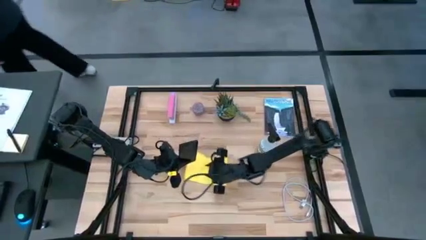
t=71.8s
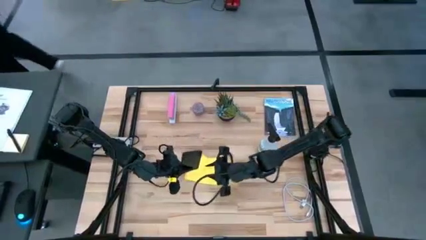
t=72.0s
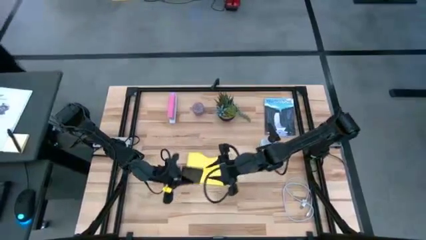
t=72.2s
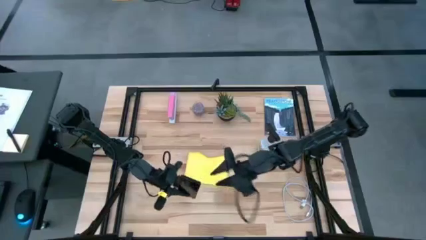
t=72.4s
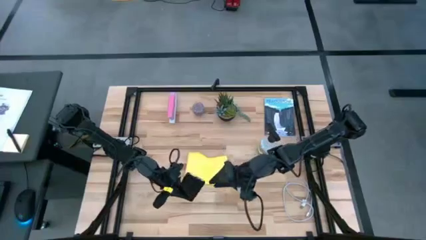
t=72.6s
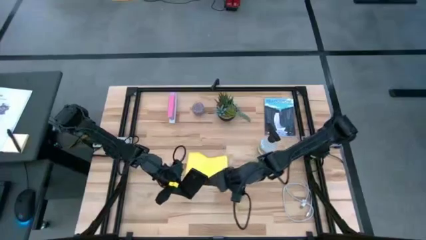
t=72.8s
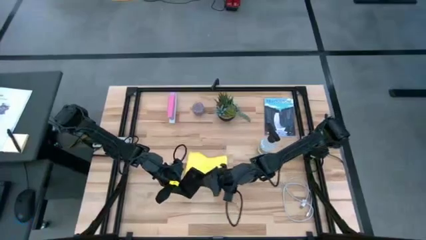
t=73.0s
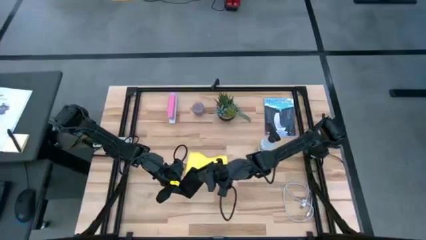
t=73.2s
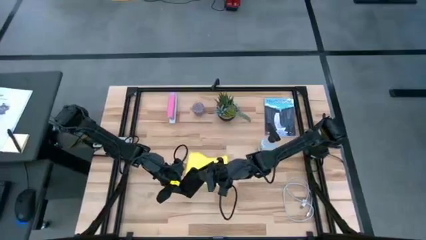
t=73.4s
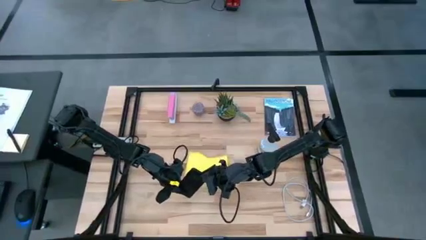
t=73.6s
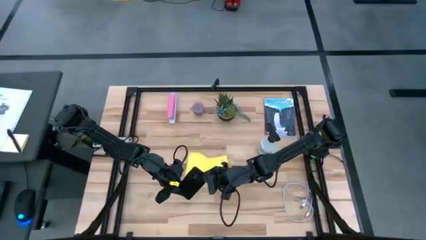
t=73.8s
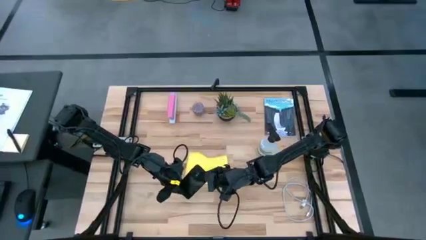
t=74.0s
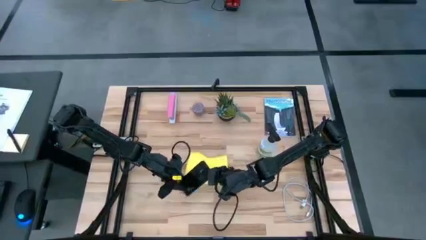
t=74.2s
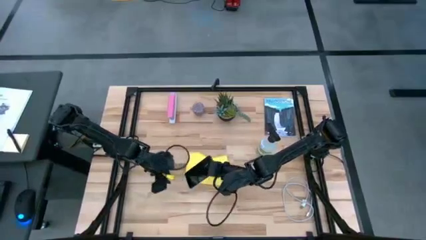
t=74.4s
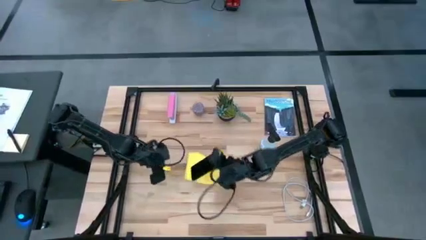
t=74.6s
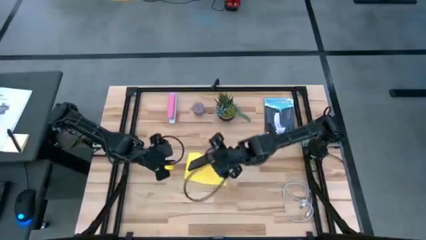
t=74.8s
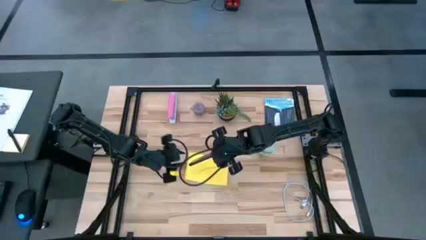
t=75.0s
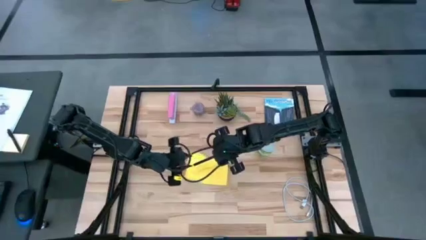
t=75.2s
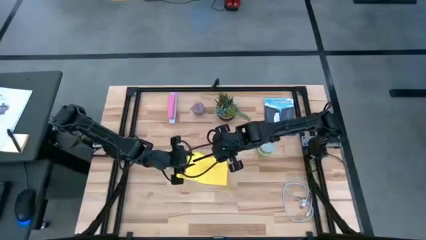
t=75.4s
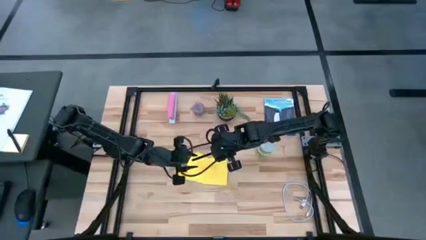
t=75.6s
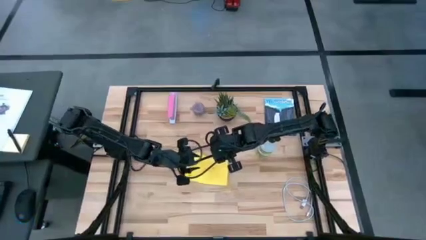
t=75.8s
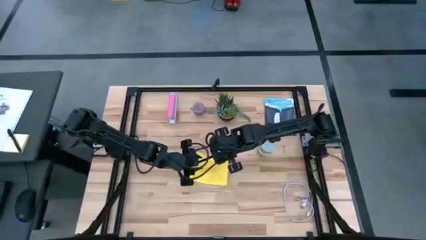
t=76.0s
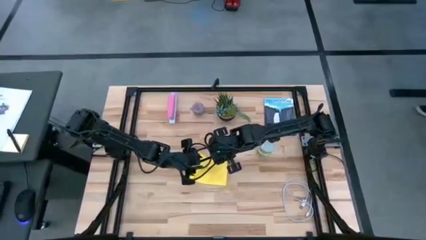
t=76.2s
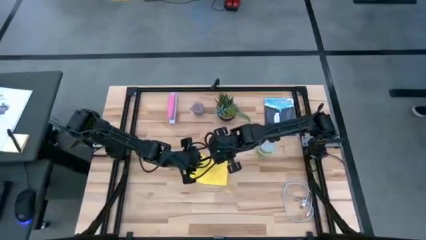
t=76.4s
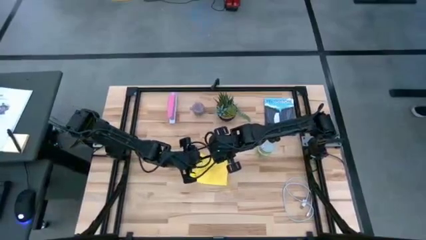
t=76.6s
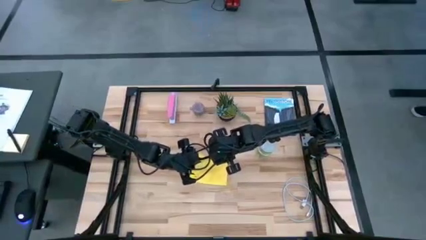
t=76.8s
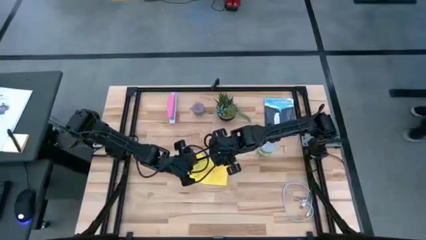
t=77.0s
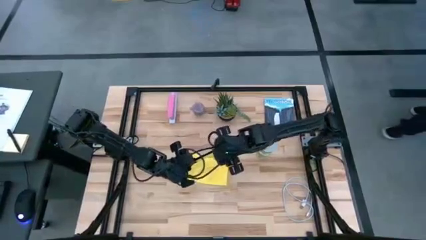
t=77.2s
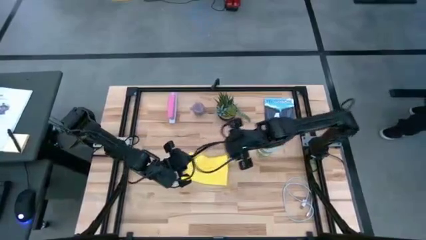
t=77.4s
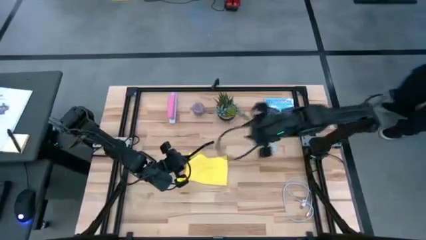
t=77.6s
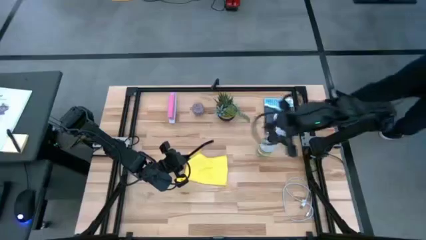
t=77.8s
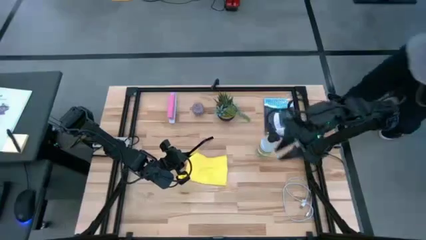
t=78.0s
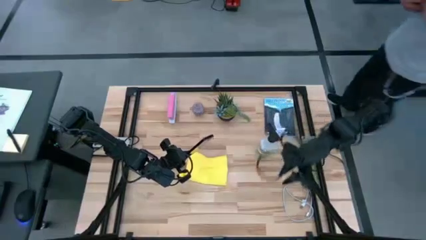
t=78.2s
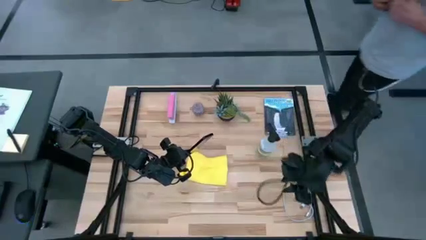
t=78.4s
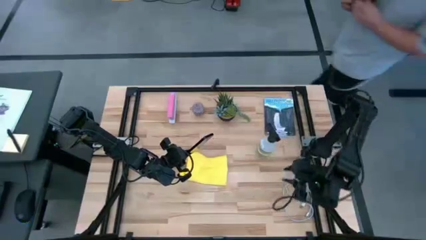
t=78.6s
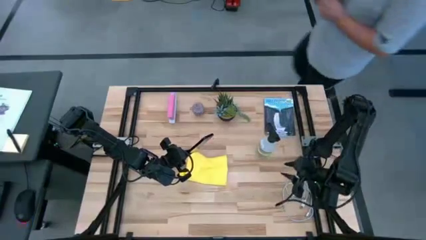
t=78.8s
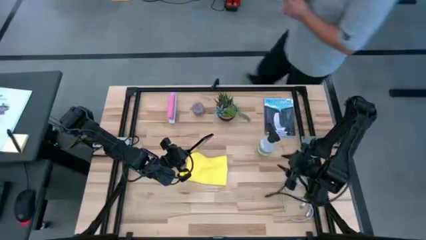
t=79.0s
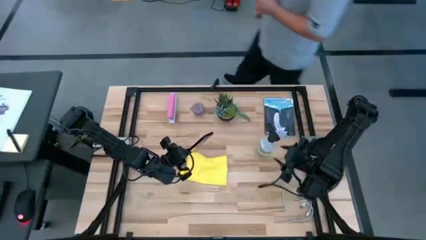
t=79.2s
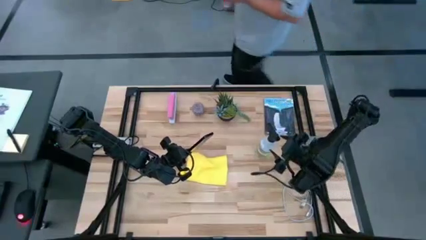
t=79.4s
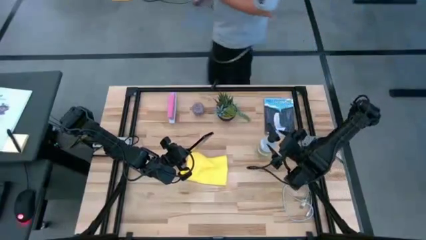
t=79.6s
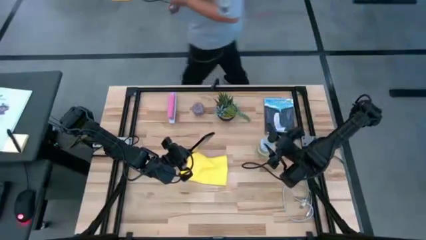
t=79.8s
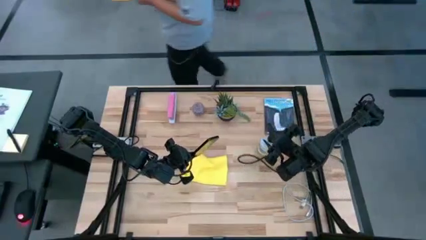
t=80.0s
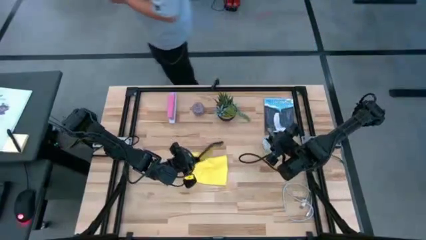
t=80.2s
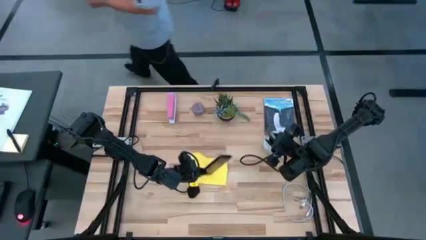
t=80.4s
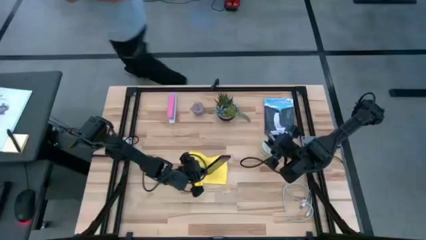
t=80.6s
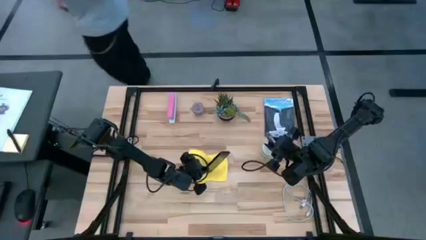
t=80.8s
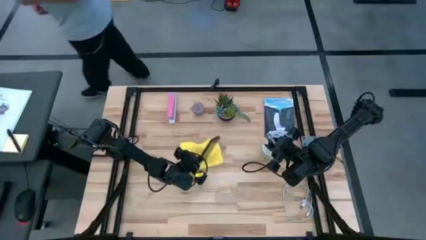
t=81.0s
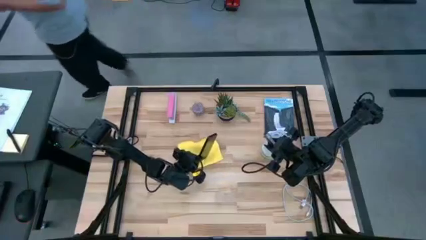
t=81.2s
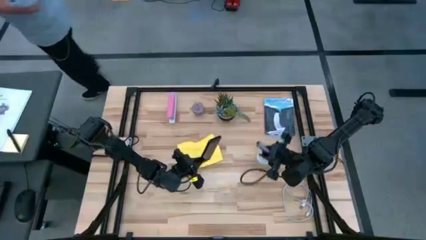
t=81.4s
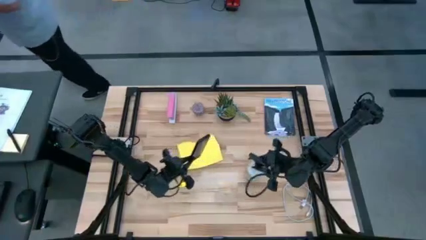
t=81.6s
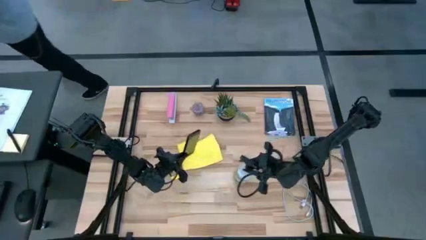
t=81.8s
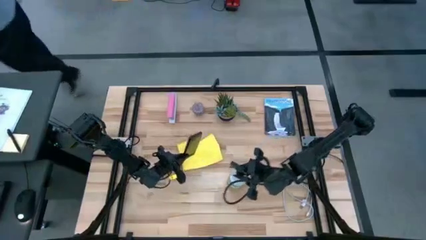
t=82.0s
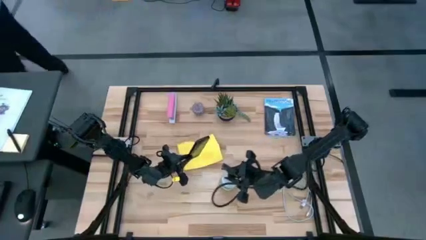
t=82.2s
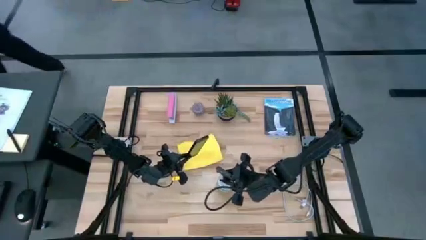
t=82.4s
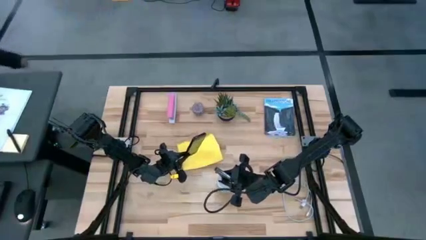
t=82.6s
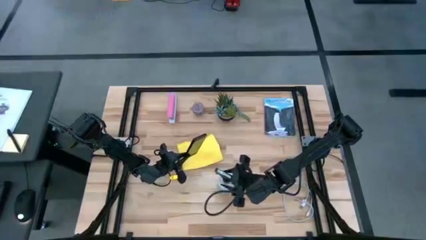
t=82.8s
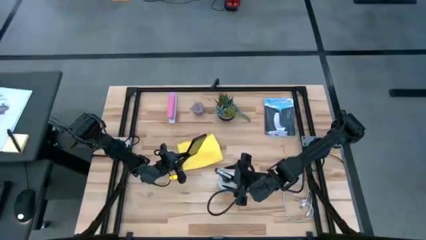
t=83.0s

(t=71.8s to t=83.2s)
Task: Apply microfiber cloth
Spray the front of the cellphone with the spray bottle

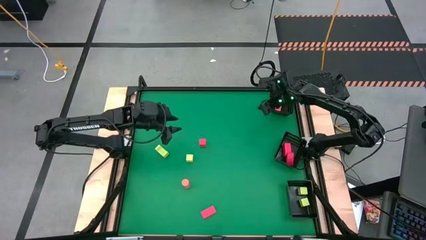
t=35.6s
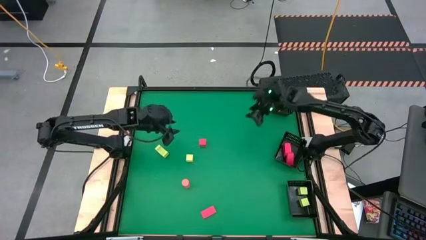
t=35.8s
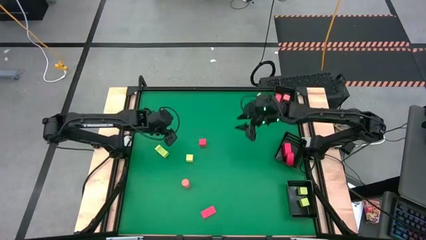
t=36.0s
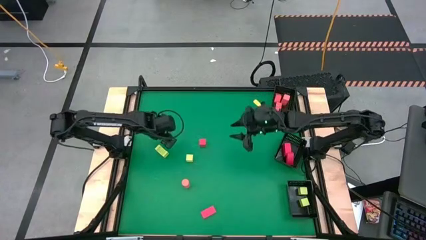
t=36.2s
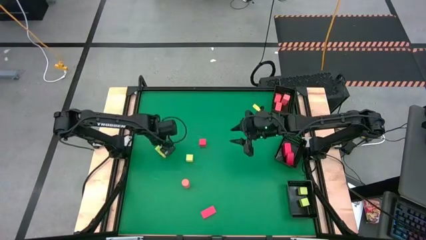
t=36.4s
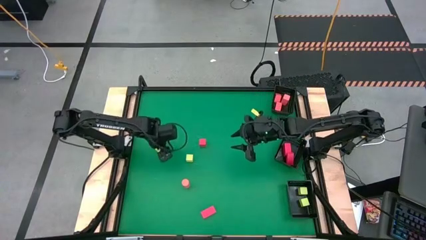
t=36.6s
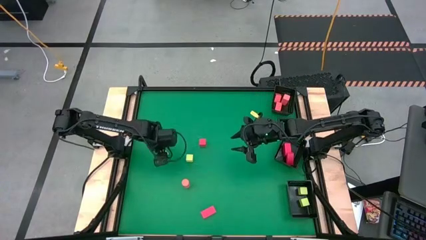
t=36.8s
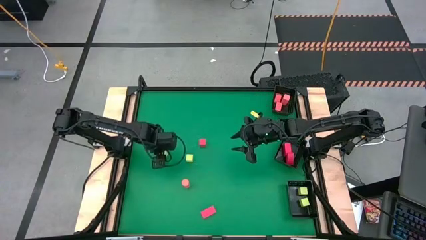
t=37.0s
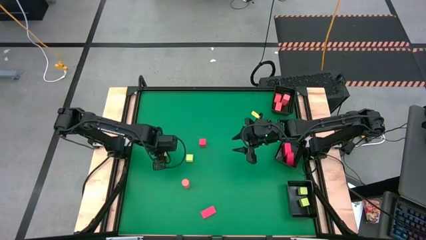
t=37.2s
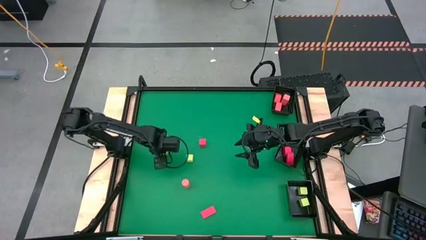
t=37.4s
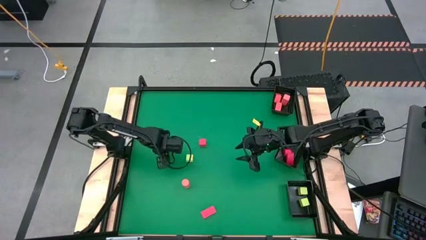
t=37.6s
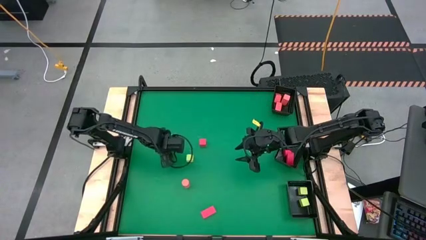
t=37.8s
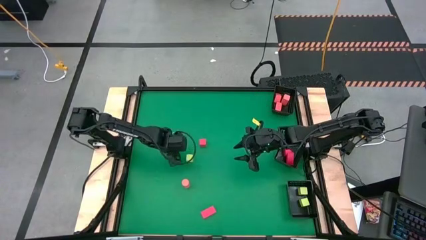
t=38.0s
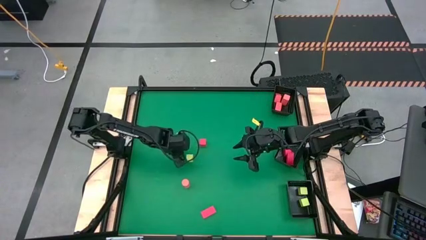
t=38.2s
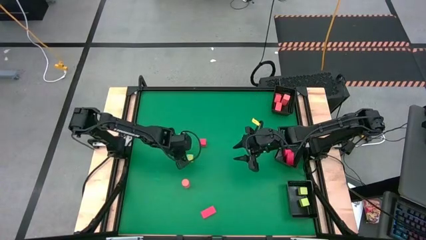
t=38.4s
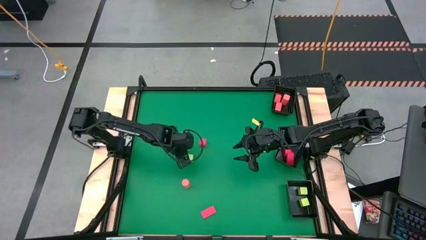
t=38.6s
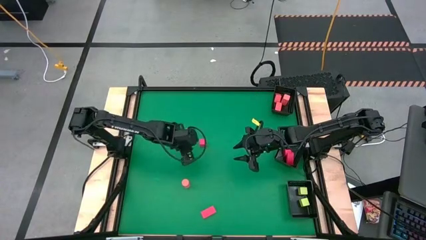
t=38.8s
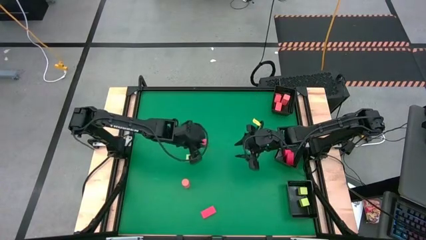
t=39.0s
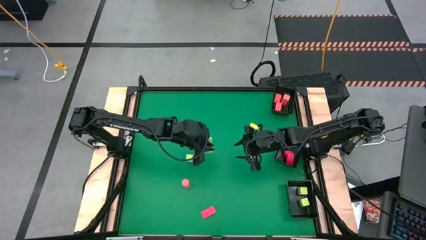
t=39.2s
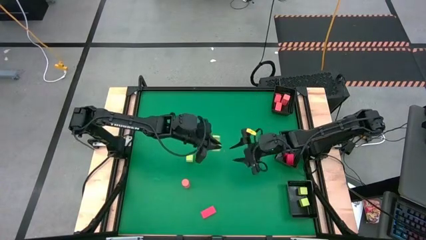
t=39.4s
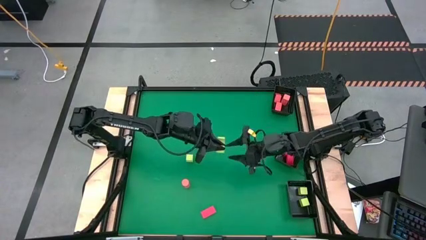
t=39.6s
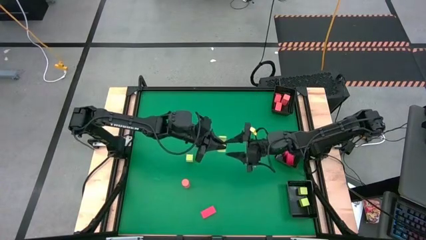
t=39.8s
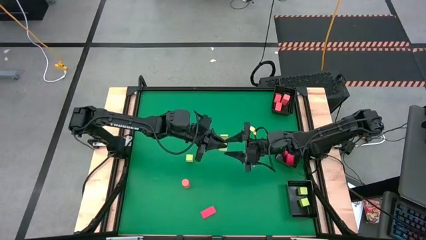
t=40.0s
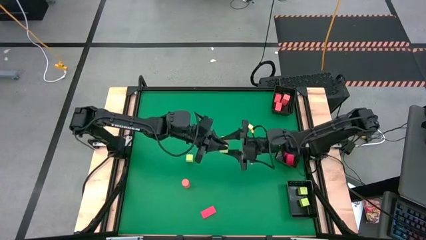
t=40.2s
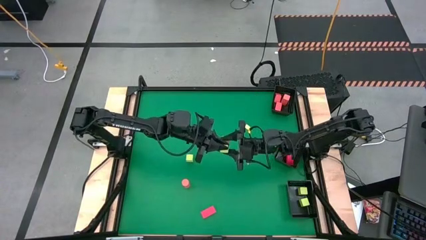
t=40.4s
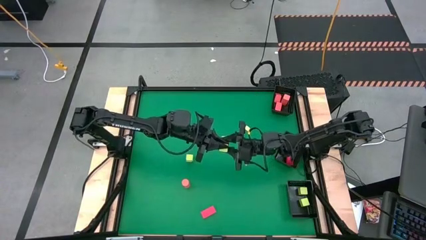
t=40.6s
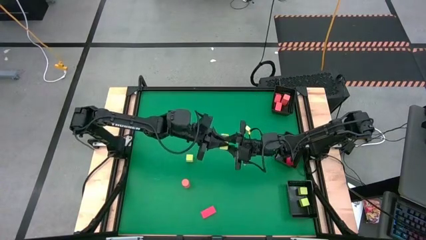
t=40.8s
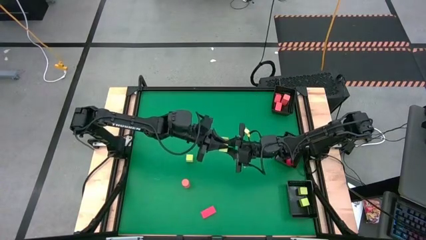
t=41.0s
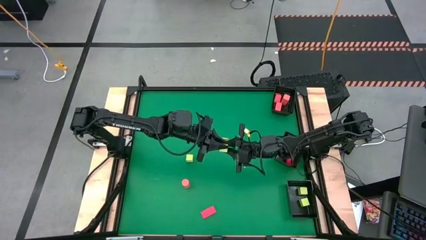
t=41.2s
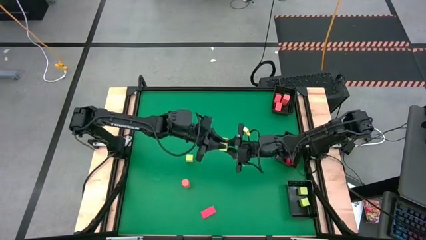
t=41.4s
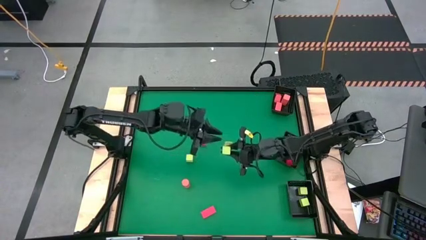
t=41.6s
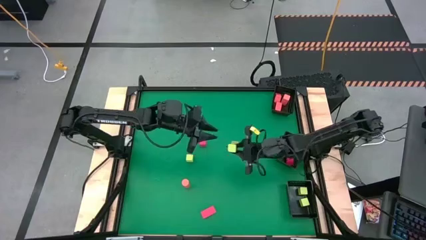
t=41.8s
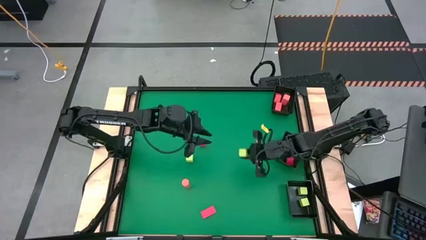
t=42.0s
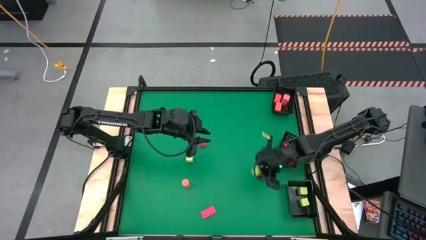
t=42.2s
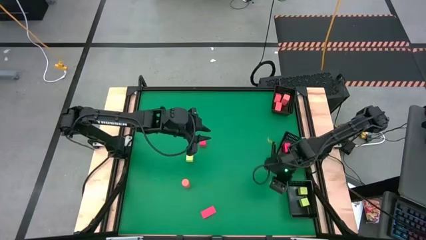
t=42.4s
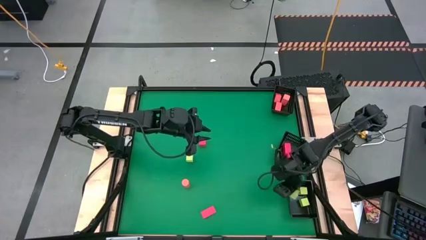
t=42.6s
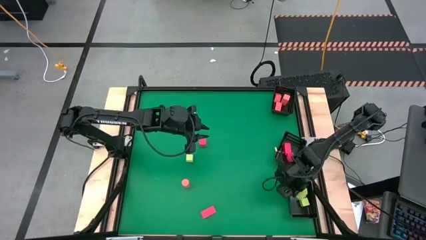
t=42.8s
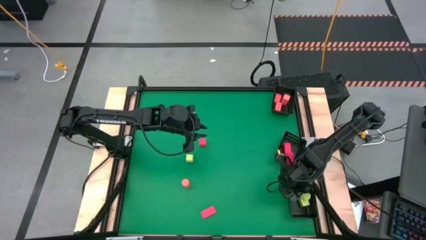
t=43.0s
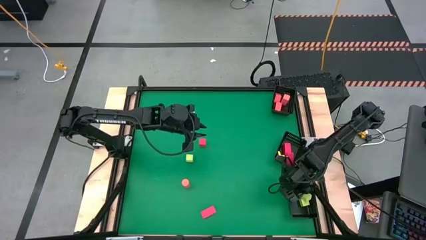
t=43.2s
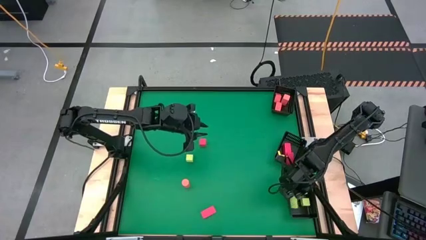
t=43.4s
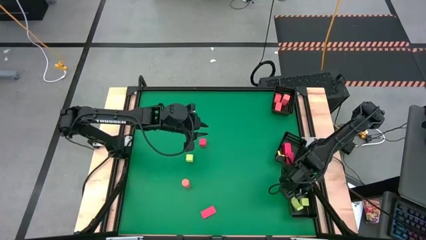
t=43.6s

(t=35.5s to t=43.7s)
Task: Sort & place blocks by color
Put the left yellow block into the bottom right black bin
